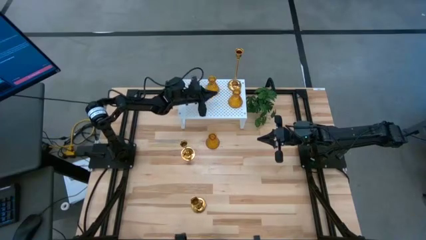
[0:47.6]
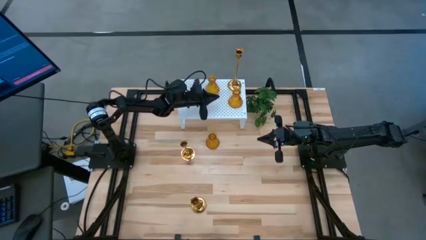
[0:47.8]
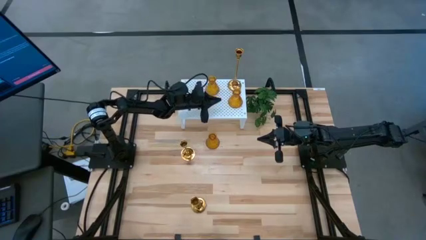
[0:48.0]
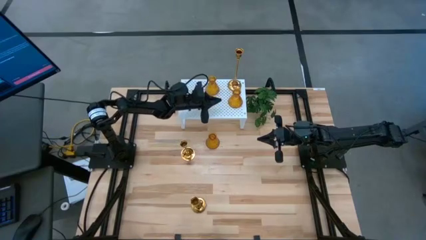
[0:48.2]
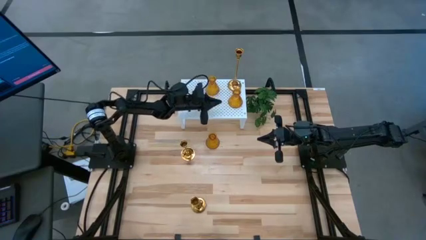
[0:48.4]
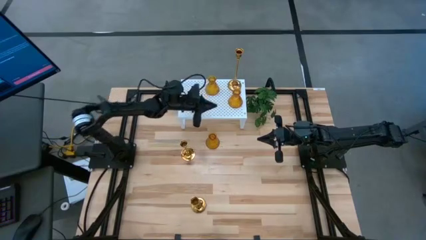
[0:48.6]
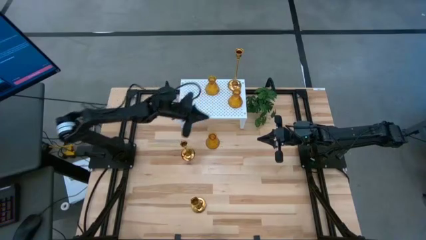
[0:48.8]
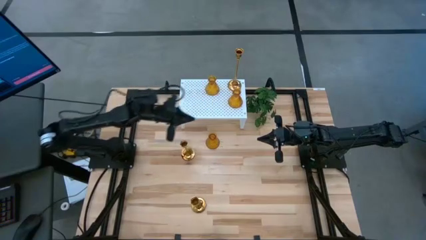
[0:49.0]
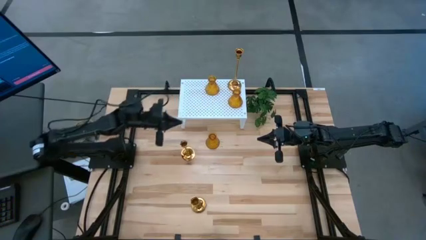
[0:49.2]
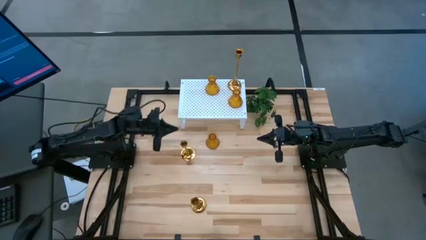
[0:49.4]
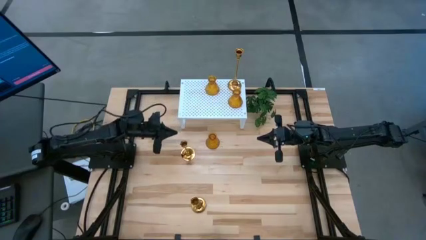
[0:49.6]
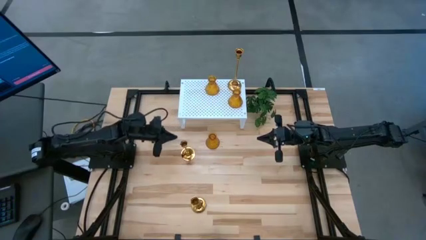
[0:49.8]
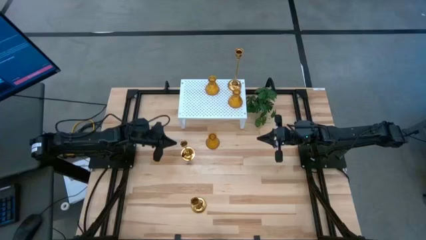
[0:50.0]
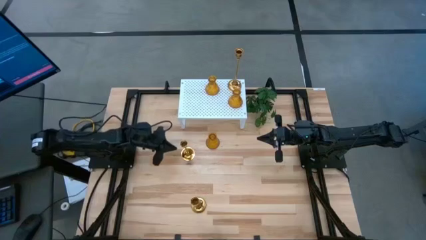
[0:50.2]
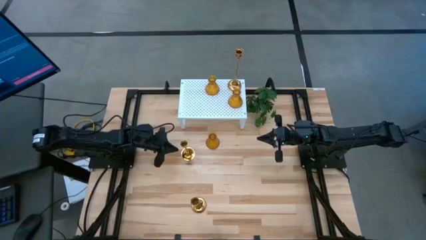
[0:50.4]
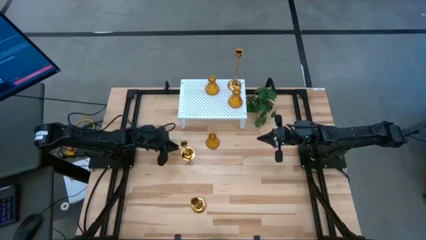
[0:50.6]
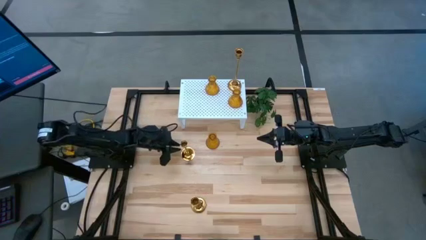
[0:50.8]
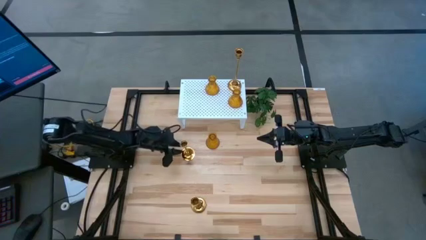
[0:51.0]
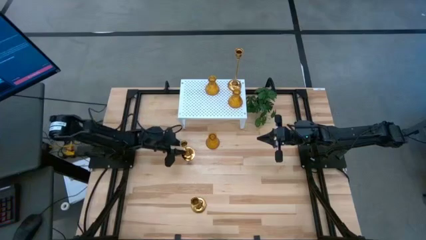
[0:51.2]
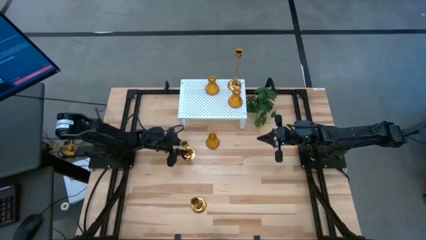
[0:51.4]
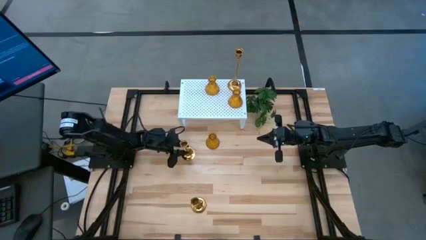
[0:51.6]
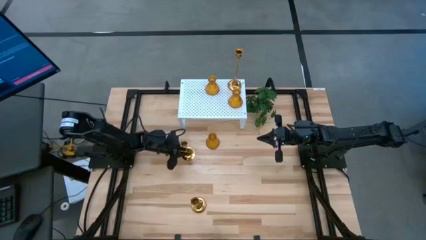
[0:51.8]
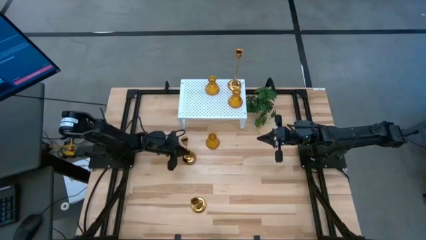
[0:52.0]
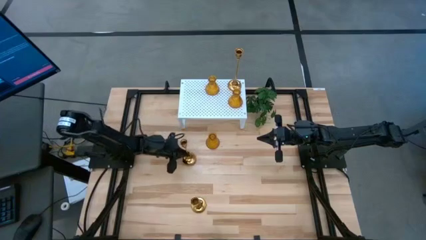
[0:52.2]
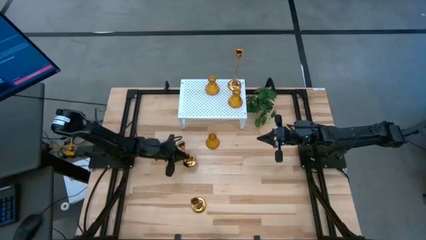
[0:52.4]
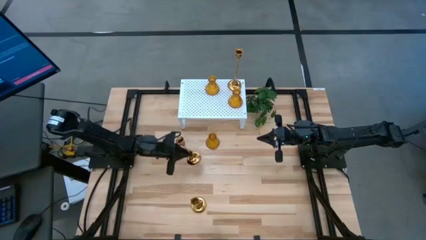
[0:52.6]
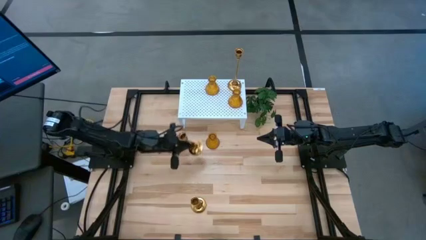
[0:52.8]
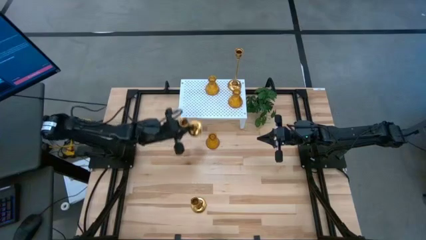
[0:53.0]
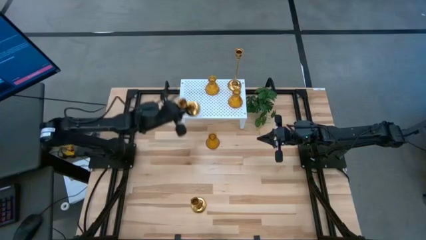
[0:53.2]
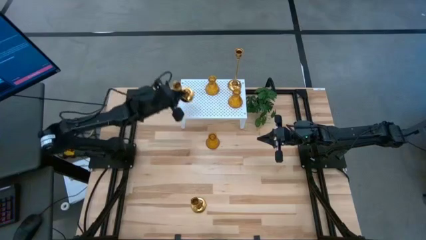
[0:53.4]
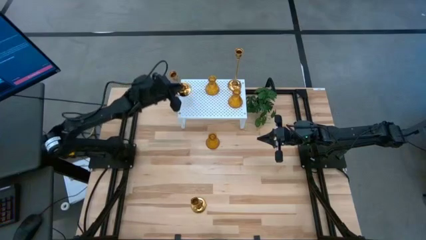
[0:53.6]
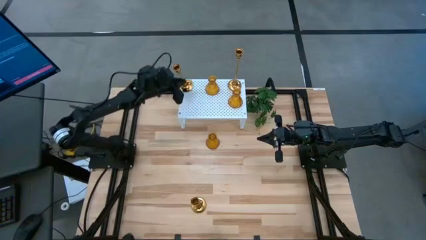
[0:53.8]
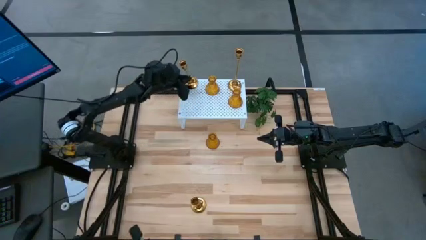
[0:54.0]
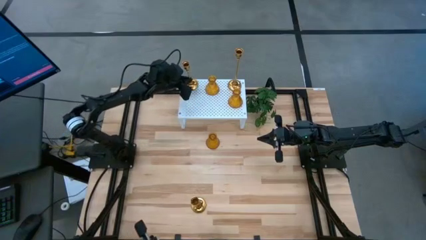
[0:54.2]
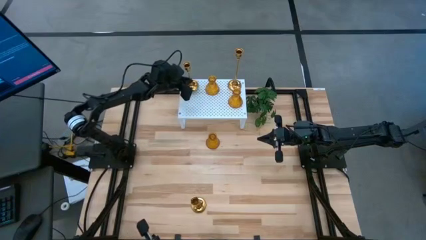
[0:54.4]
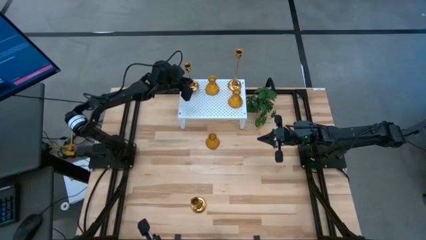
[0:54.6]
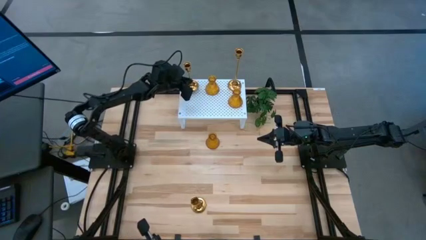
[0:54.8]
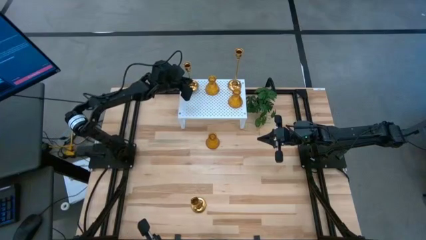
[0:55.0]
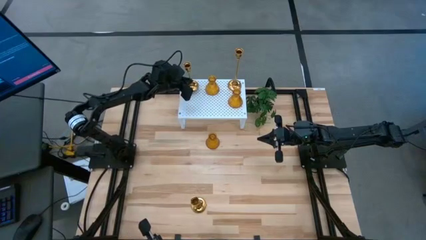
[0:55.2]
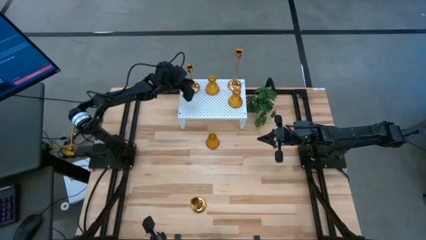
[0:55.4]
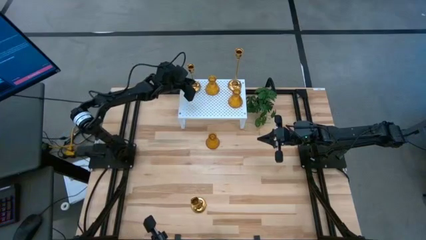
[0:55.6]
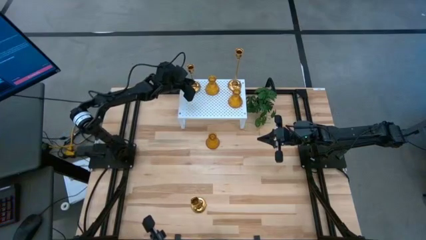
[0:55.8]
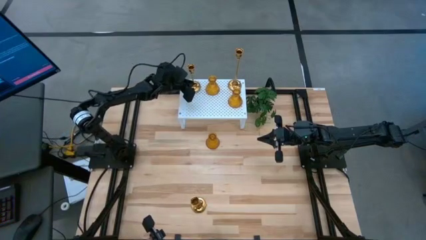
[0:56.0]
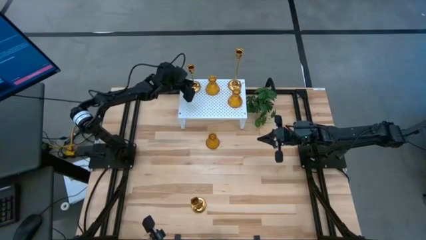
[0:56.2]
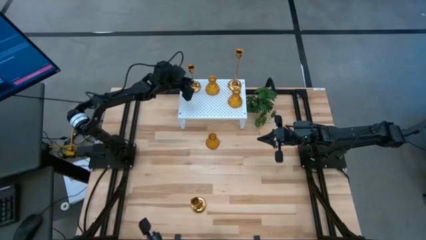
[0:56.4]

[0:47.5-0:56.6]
Task: Pick & Place candle stick holders
Put the top gold candle holder on the shelf

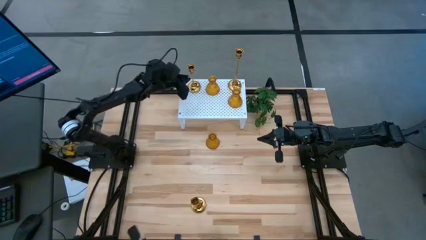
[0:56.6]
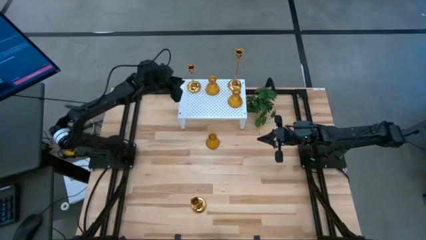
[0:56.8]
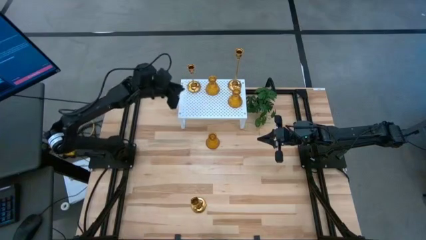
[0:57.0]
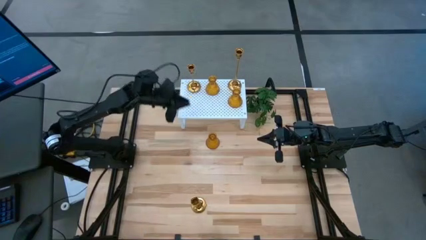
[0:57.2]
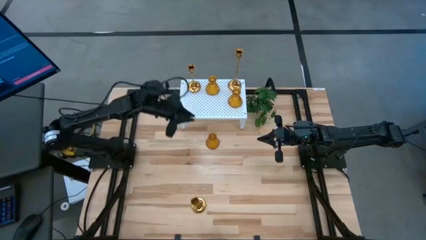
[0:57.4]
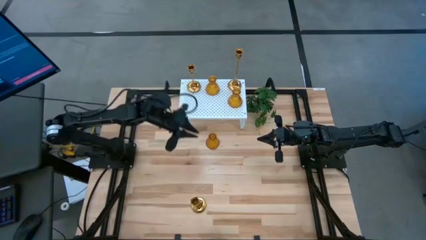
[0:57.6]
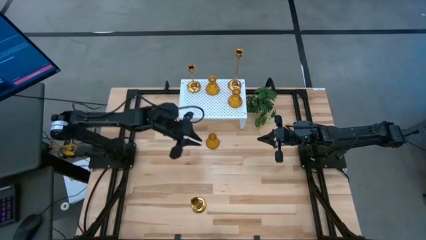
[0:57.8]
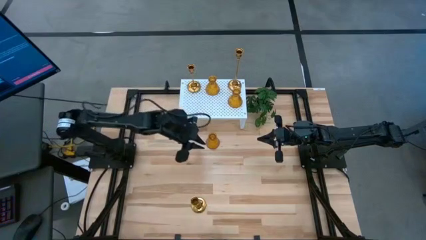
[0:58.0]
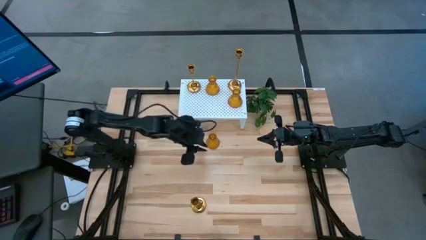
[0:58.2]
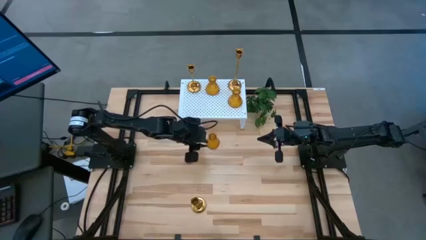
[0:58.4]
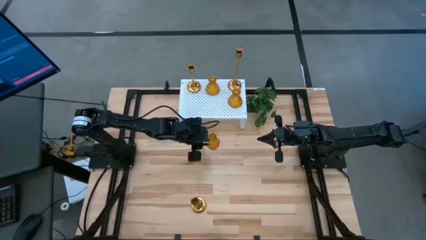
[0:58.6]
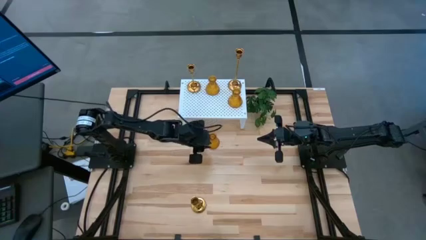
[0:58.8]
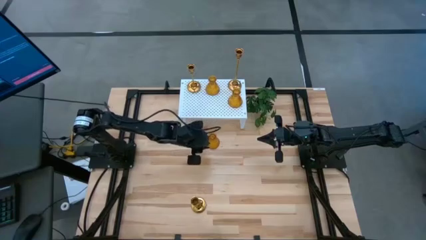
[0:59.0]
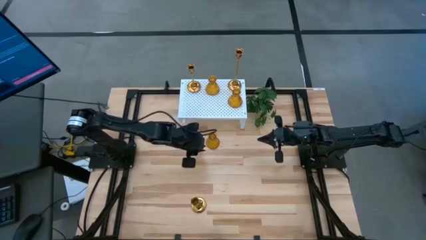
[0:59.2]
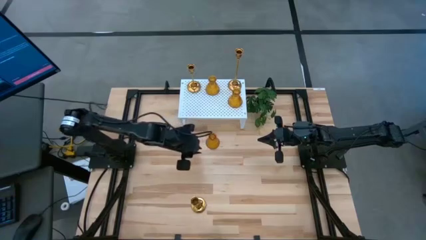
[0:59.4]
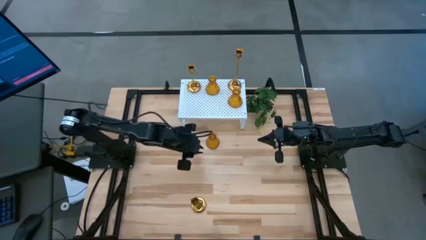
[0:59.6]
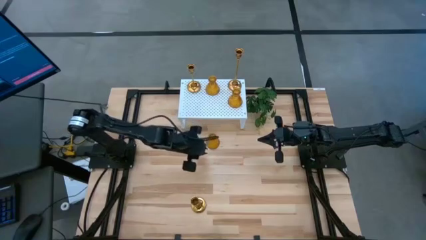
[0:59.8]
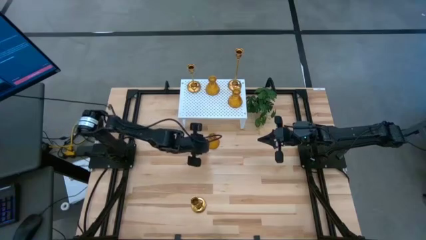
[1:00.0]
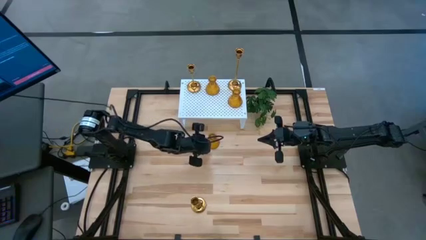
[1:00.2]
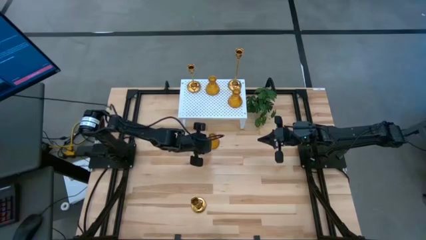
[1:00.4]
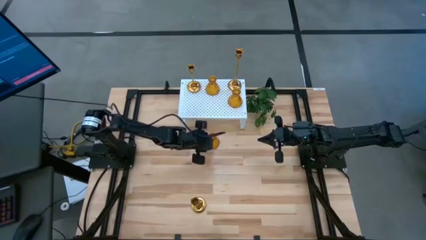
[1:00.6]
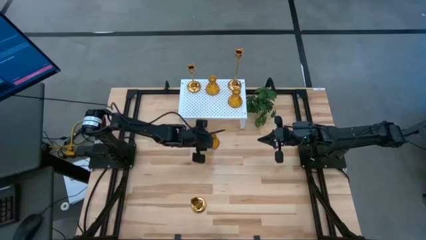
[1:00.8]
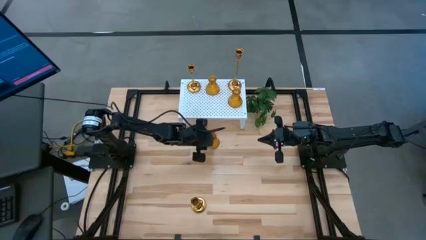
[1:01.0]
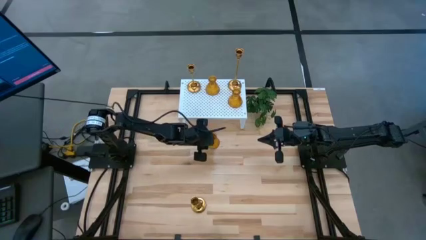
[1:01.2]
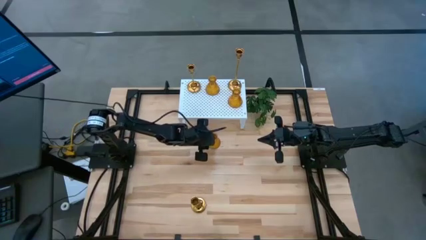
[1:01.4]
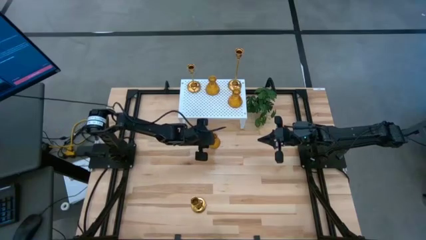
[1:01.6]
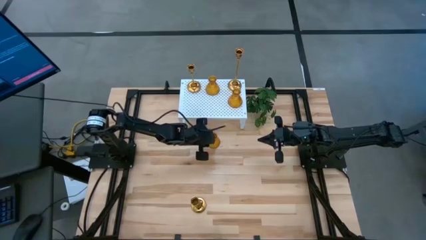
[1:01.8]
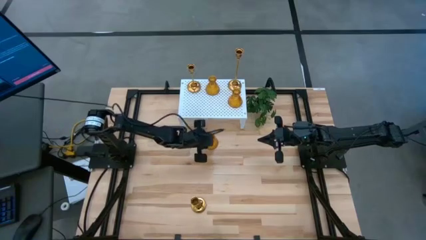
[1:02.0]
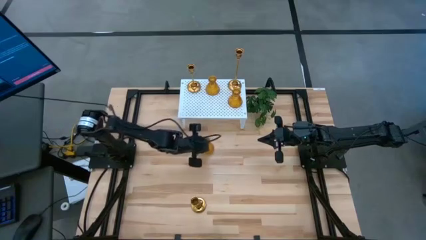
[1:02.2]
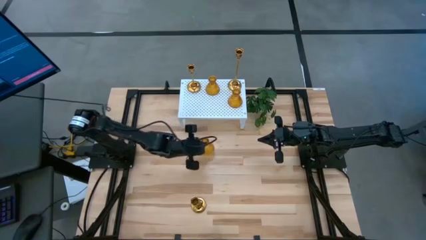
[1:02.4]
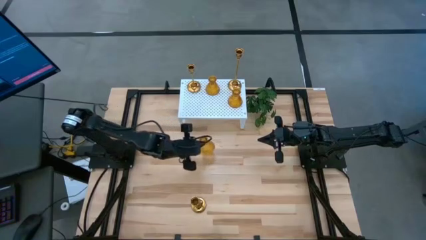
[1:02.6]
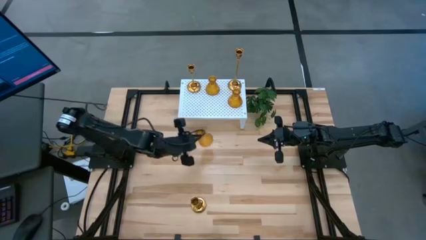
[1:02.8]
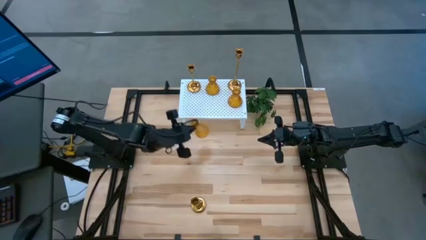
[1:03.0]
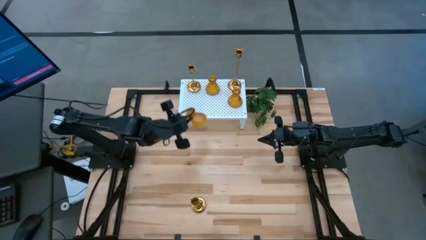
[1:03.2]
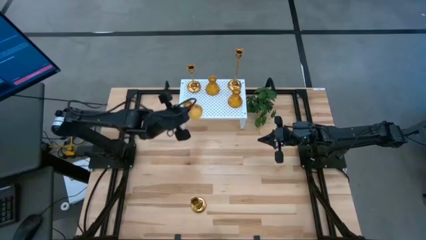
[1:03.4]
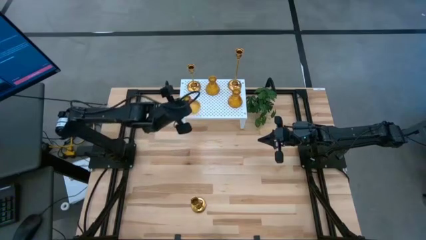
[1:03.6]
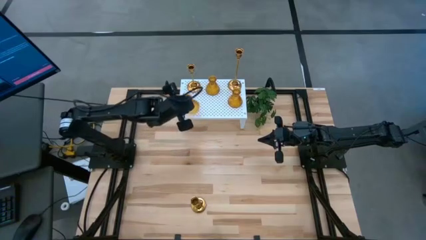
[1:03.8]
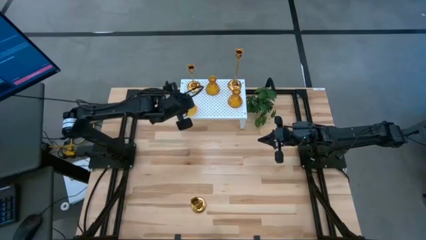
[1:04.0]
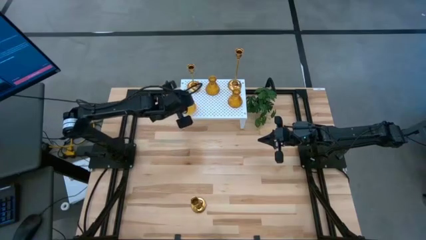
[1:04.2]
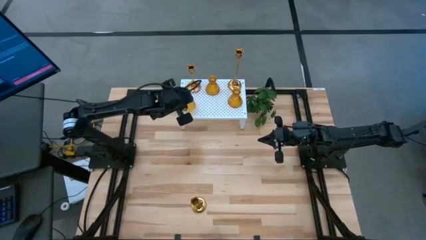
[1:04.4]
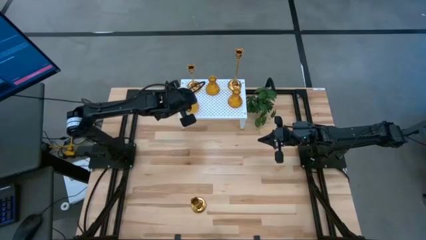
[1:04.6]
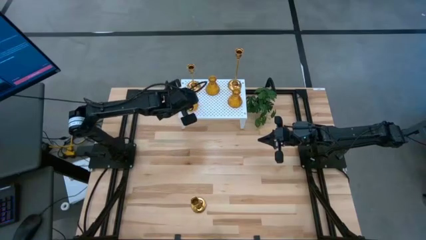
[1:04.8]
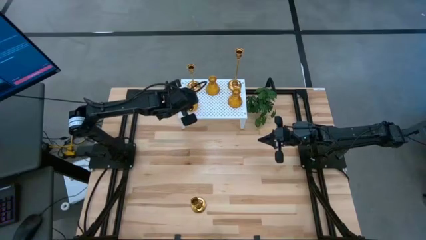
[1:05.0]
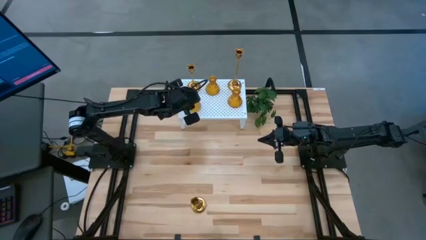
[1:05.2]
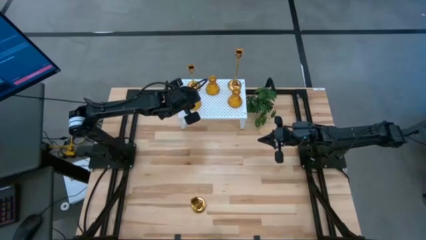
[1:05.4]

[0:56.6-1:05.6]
Put the gold vase on the shelf
